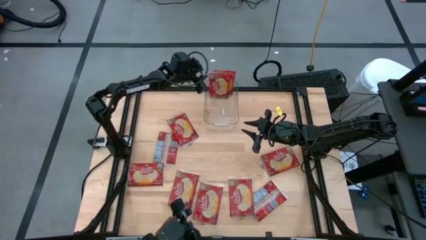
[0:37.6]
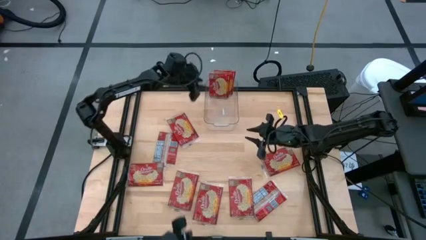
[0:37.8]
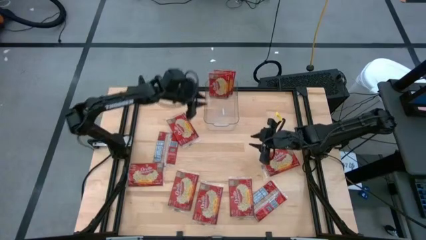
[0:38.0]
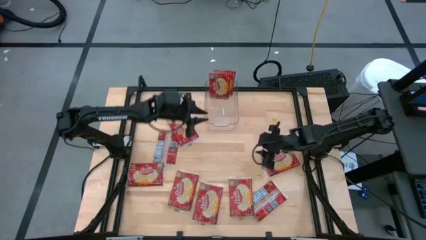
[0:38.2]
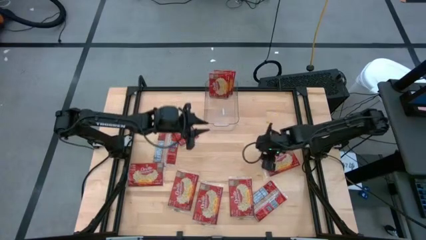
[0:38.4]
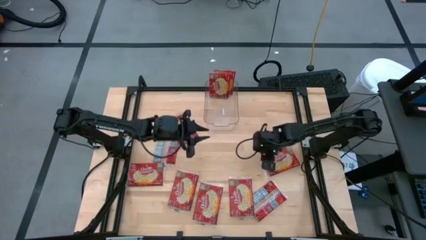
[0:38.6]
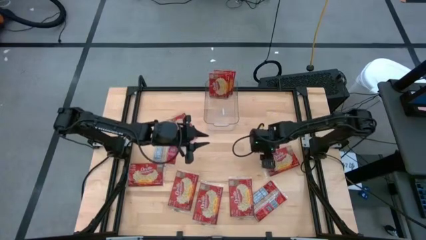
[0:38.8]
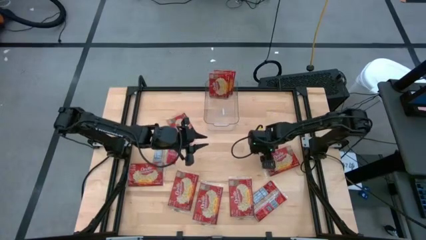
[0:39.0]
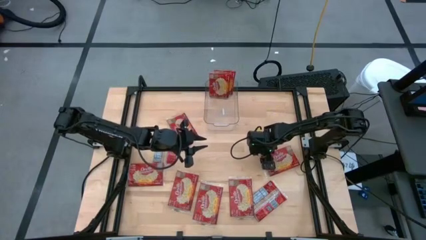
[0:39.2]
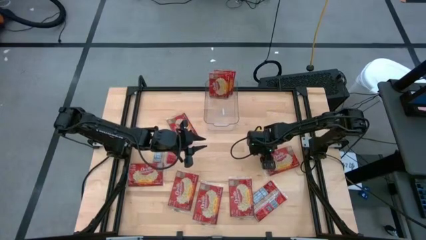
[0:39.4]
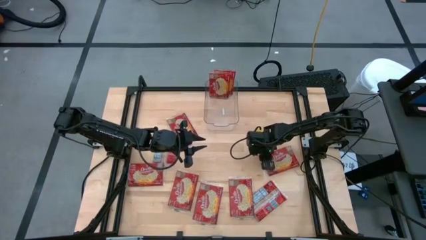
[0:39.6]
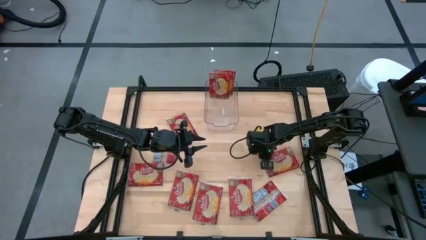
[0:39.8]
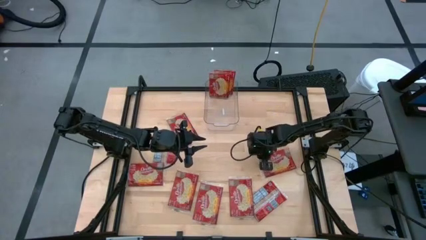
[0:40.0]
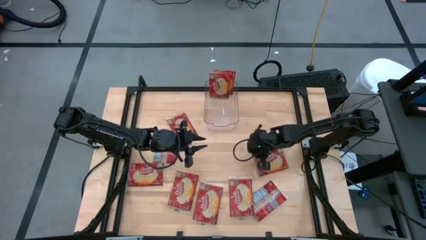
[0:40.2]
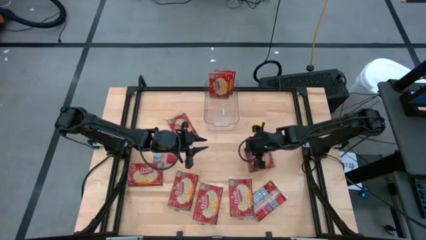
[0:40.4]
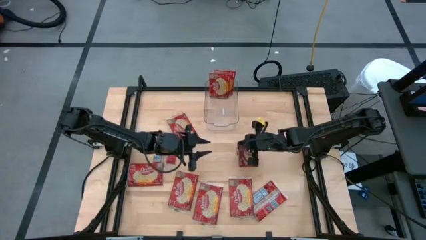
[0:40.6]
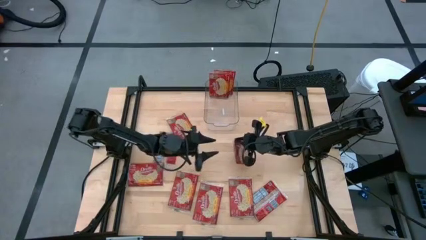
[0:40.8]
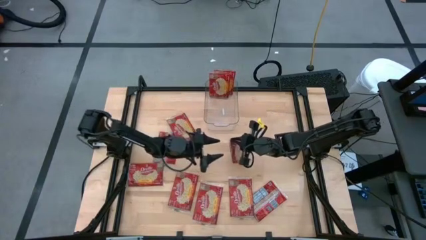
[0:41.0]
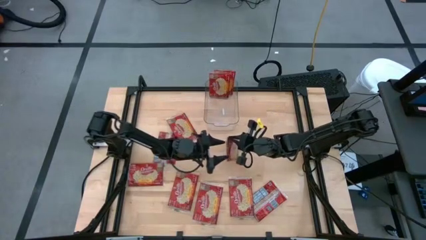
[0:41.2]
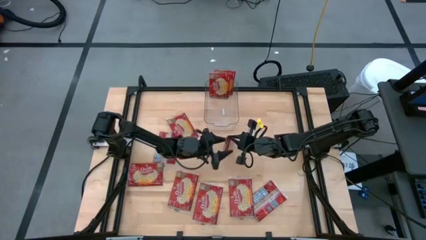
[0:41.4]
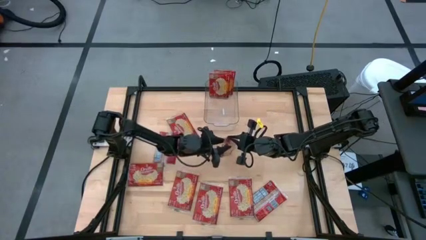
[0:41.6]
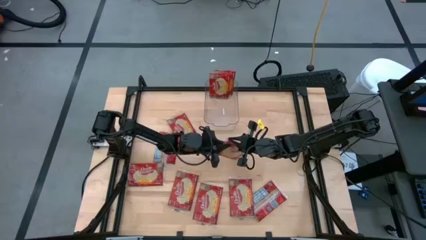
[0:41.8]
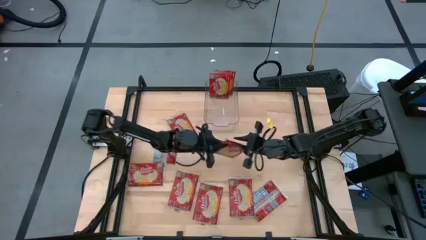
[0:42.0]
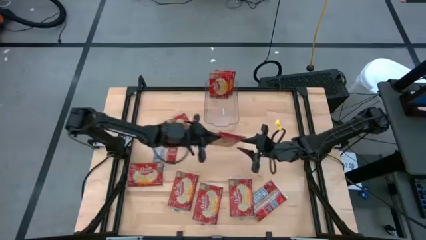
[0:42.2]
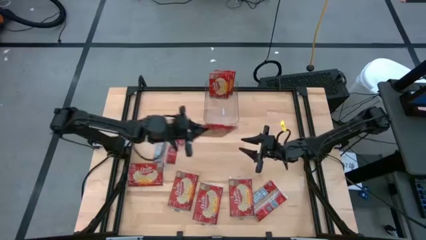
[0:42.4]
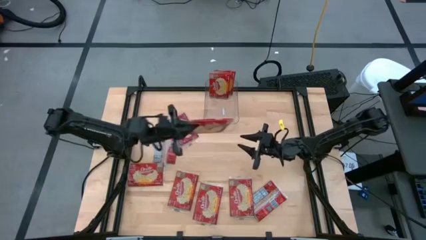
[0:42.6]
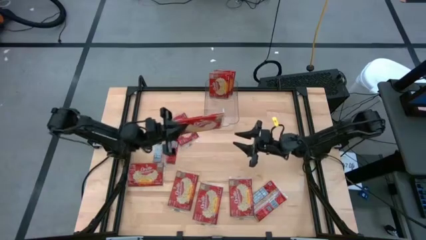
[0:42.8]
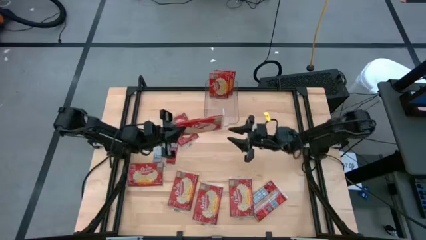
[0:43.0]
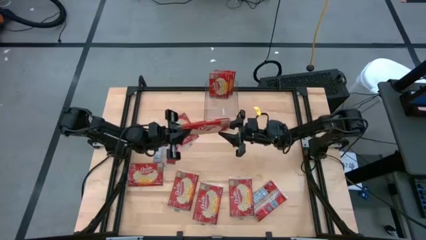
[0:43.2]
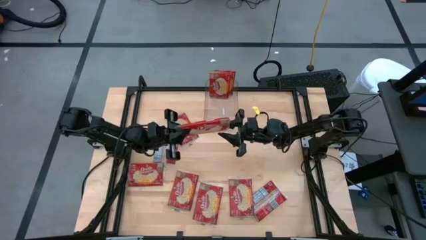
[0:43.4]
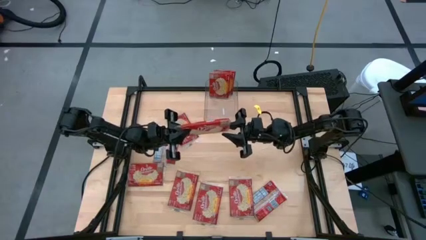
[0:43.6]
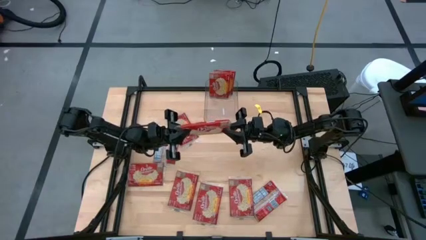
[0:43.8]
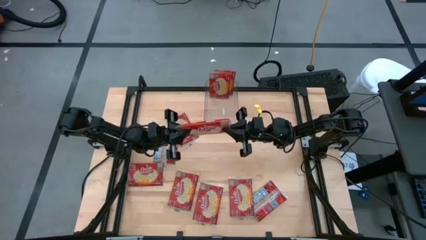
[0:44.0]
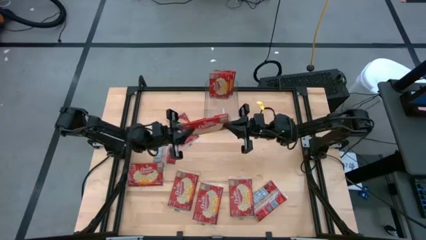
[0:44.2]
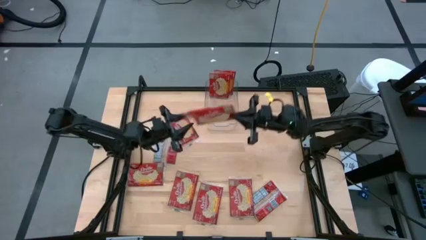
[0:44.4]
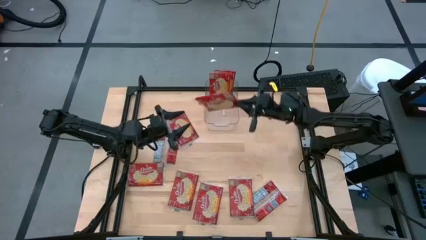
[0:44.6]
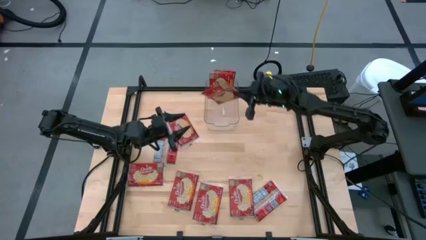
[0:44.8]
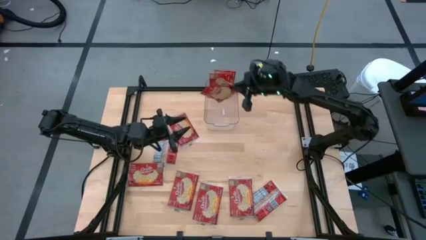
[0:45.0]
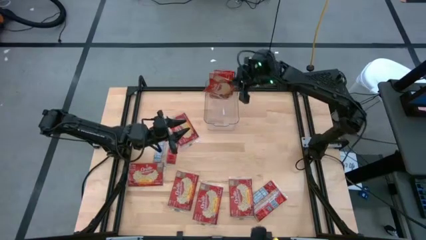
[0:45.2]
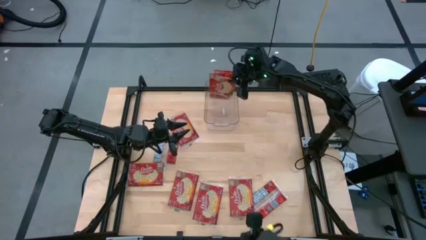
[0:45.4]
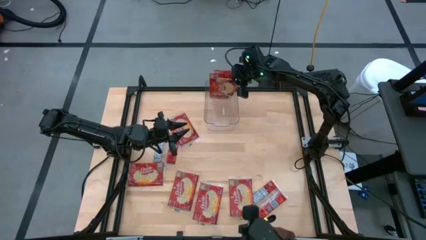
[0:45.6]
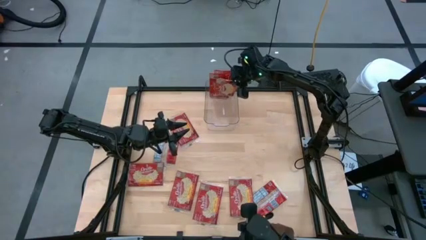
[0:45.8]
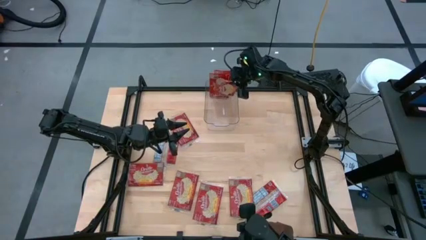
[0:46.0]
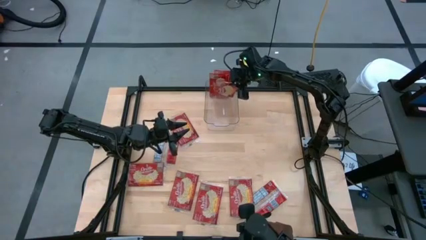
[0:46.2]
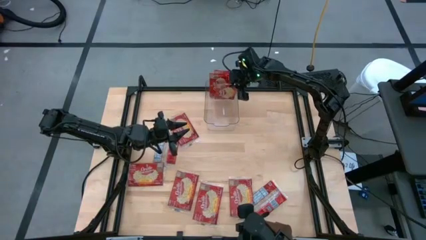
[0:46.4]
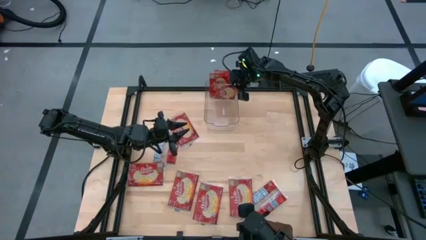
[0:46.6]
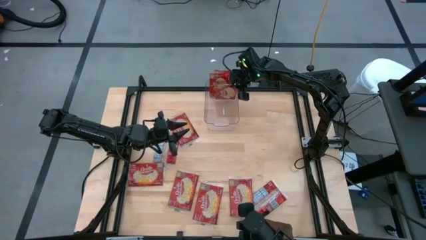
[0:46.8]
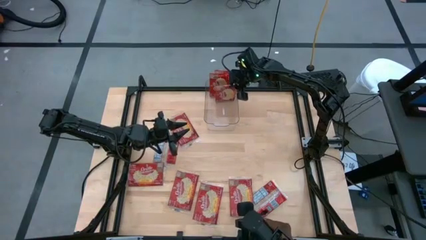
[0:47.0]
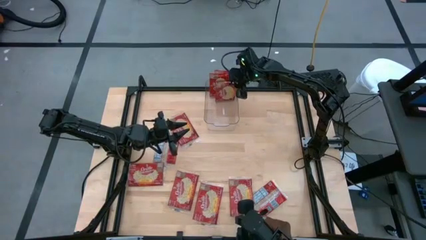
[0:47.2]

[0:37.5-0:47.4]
Task: Sort popcorn bags into baskets
Put the red popcorn pack into the transparent bin

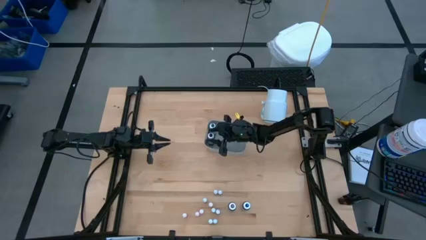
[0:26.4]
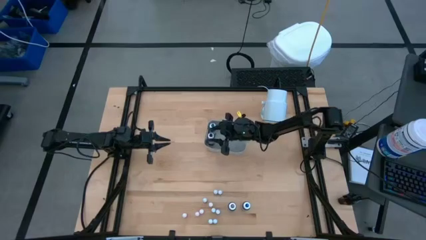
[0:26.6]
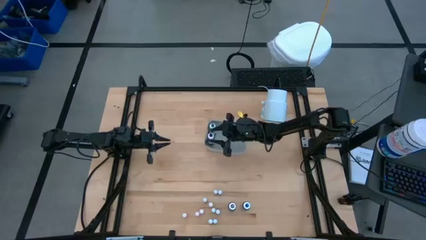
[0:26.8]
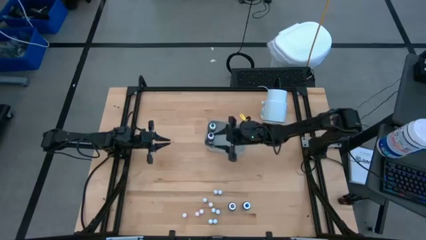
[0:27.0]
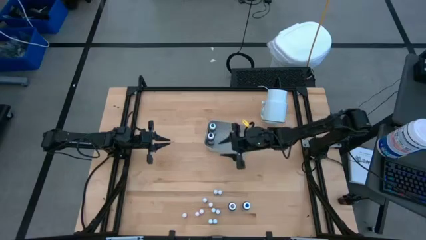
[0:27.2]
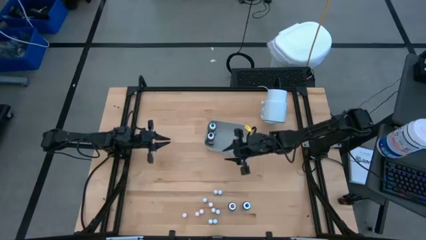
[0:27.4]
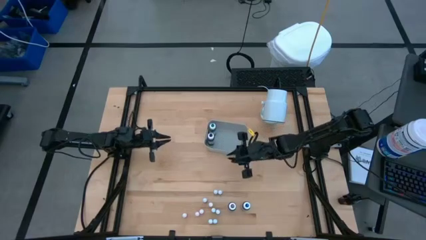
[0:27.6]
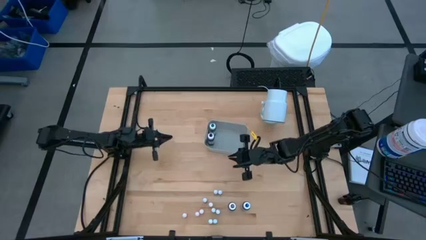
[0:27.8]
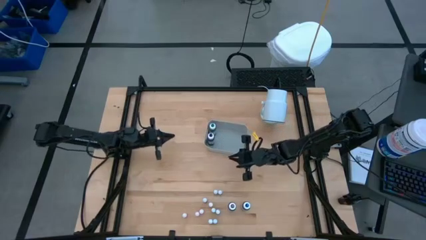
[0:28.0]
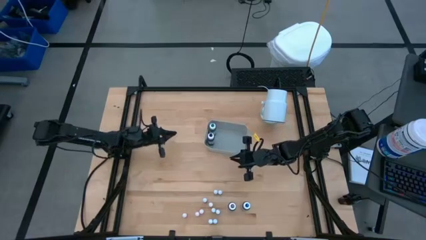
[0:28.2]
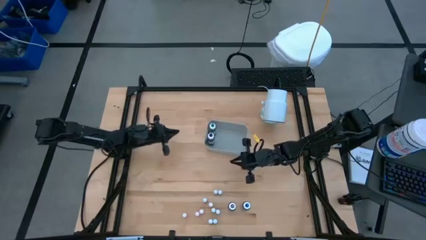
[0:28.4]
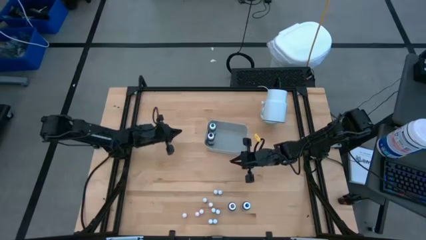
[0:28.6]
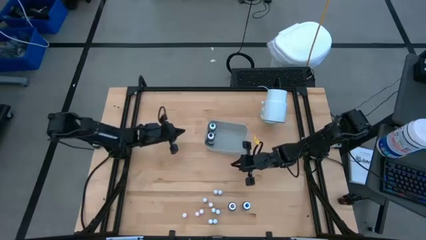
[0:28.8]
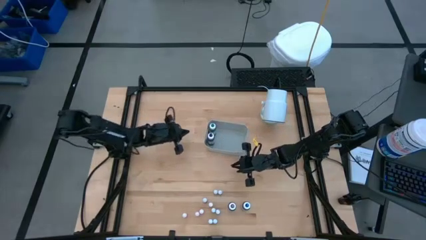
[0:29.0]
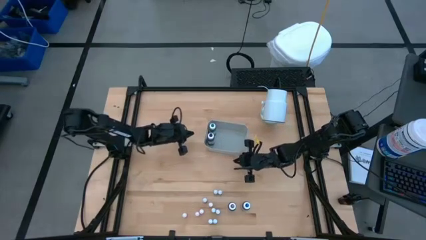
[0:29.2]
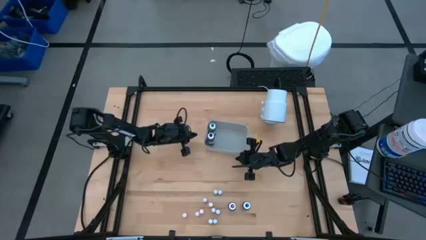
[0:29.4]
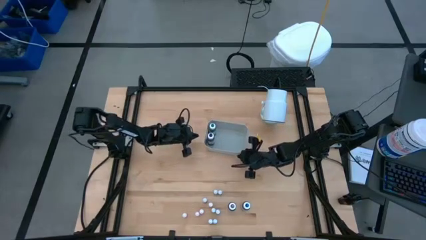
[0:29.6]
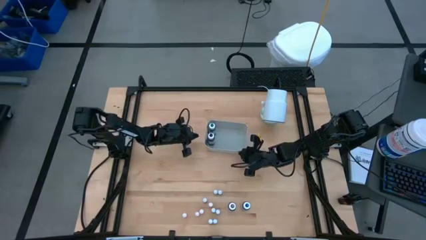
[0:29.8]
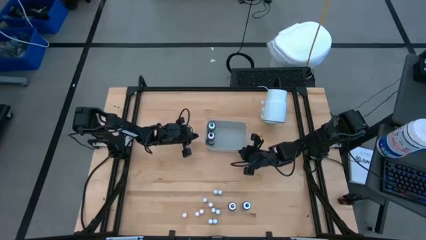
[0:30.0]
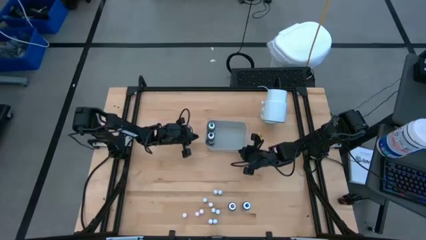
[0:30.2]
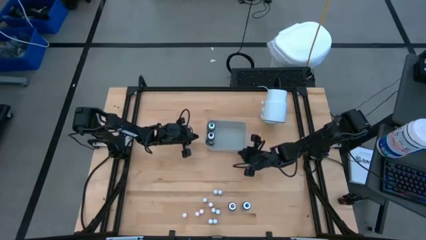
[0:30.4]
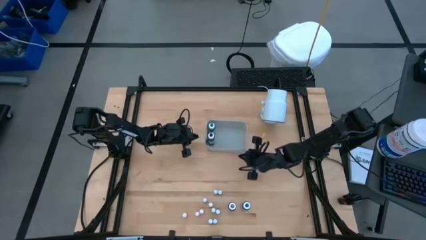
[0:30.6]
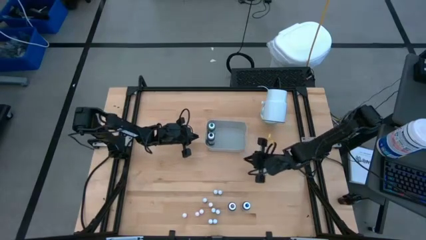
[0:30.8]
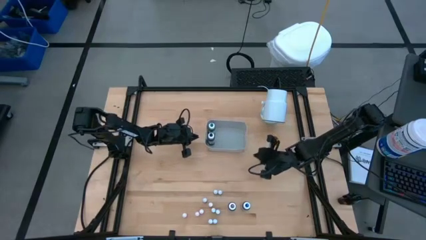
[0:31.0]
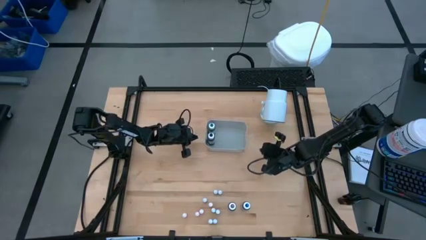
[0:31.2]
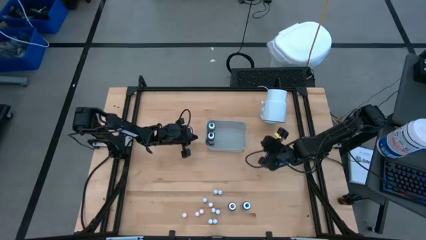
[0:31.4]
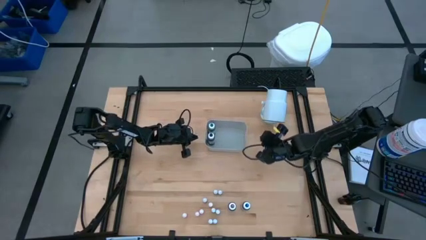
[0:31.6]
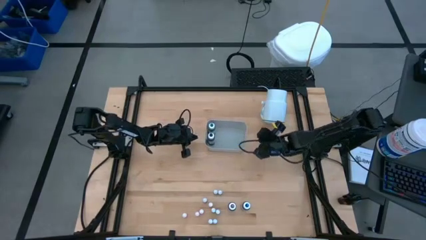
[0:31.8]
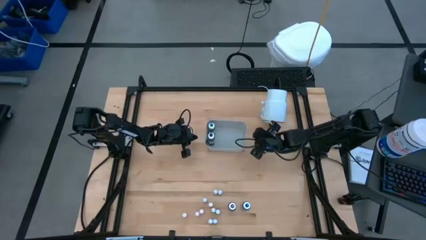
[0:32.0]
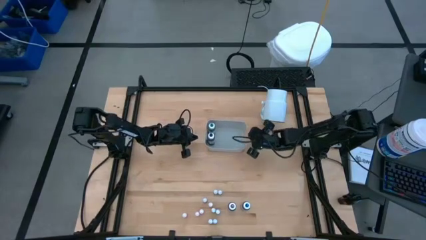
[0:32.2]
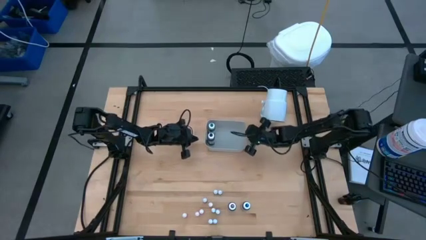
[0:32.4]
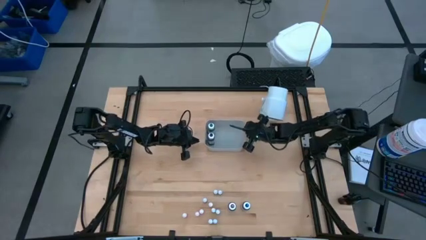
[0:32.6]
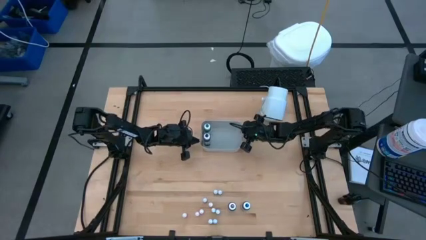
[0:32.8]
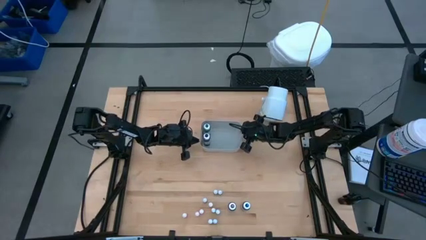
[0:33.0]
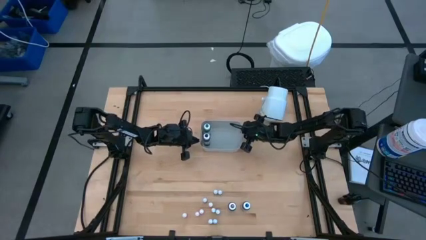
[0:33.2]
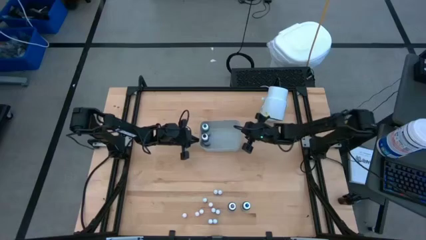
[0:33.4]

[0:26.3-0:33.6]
Task: Pick & Place food coloring
Adjust the gray bin
